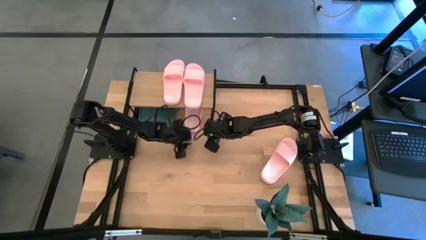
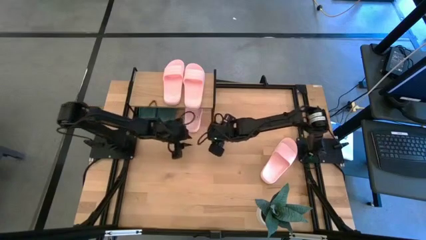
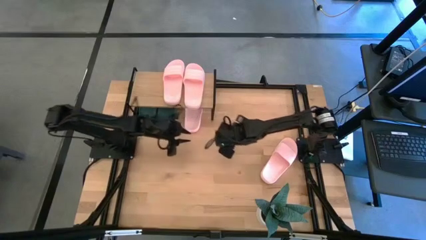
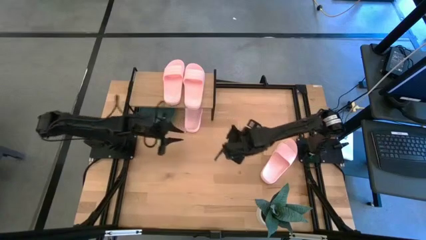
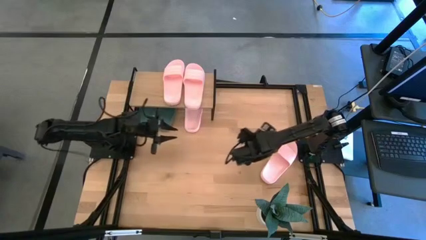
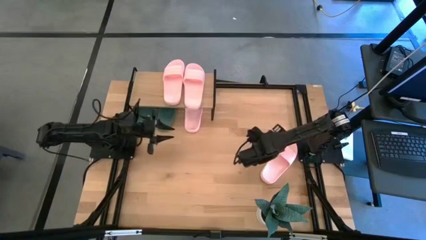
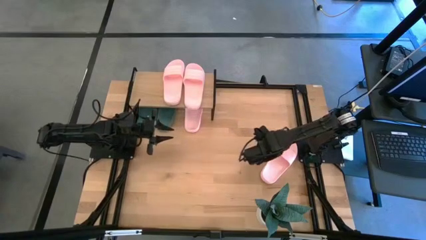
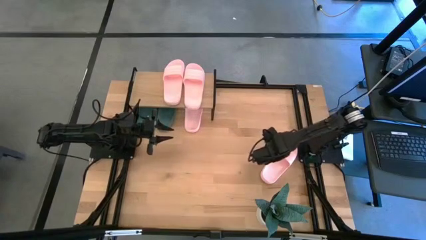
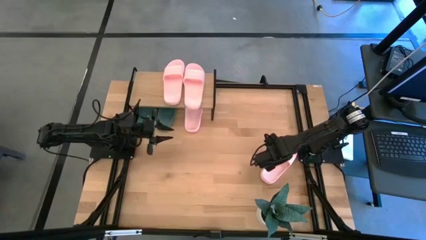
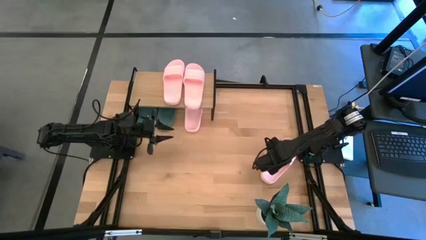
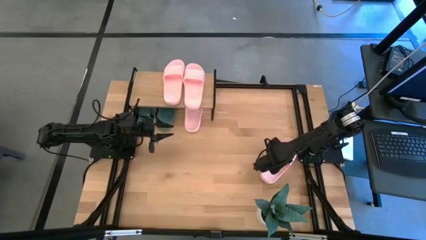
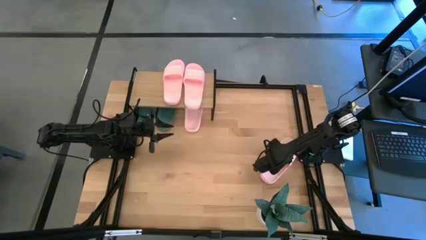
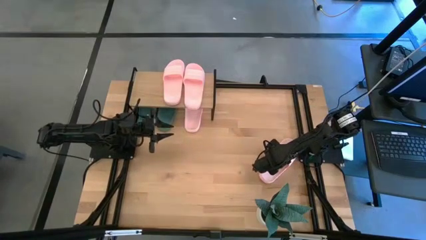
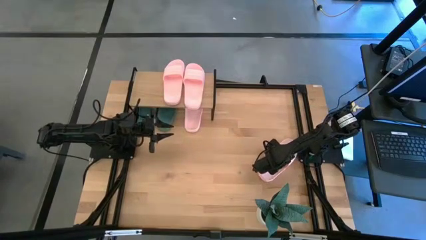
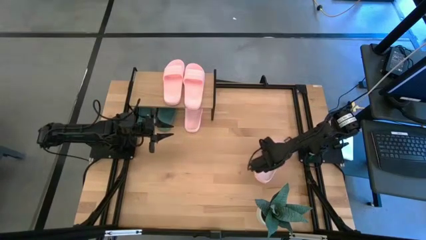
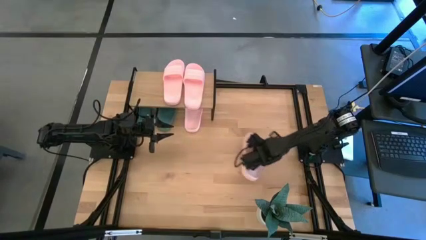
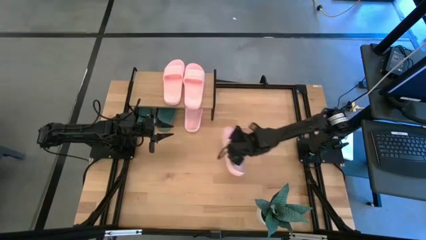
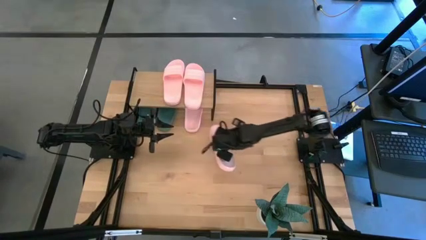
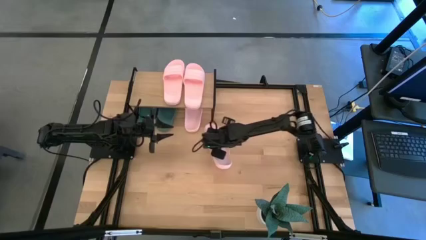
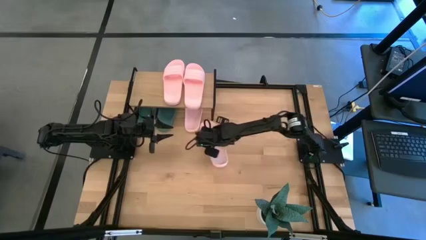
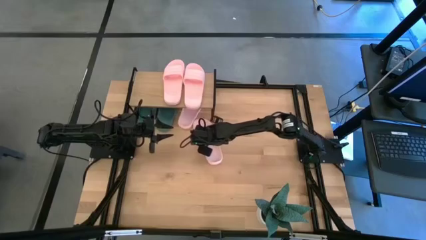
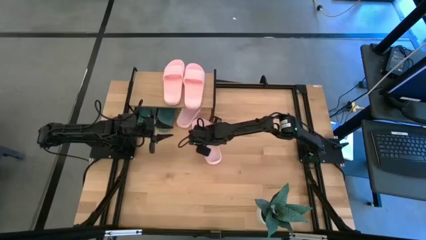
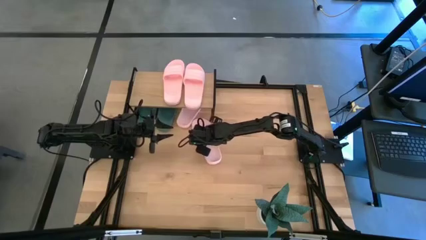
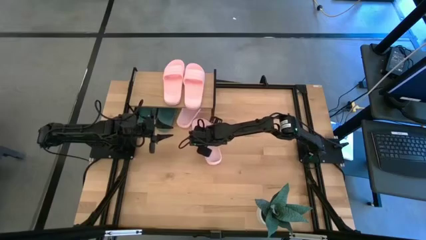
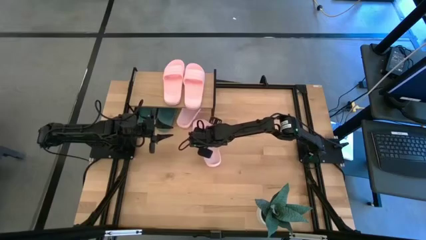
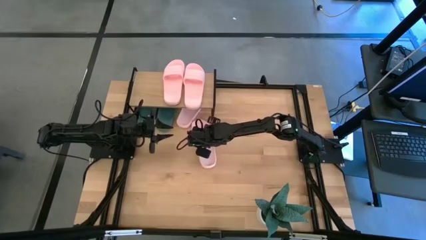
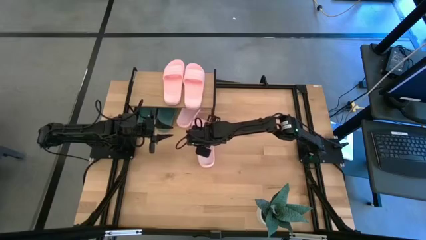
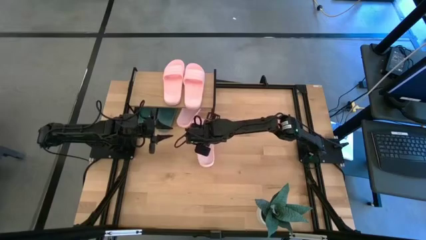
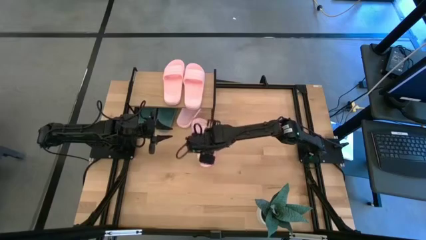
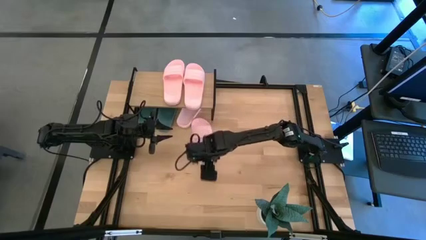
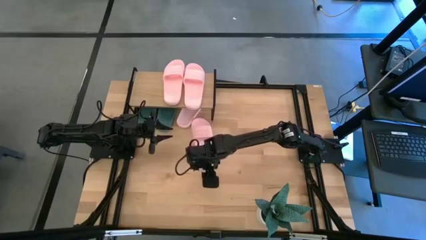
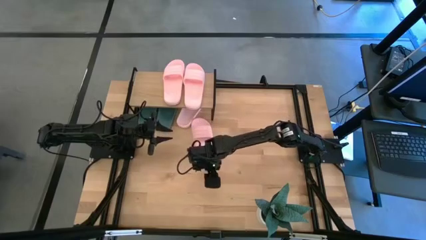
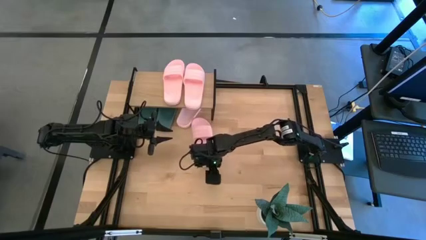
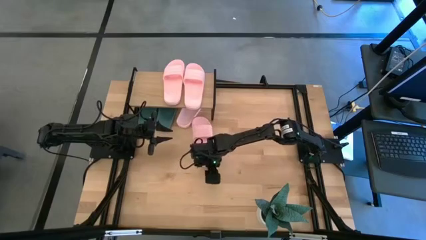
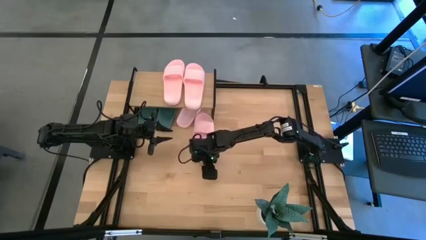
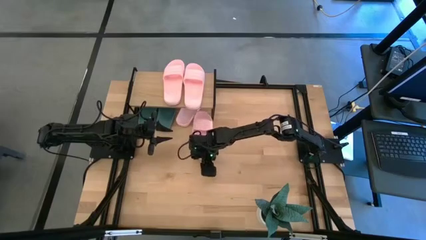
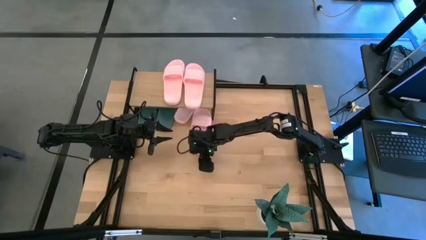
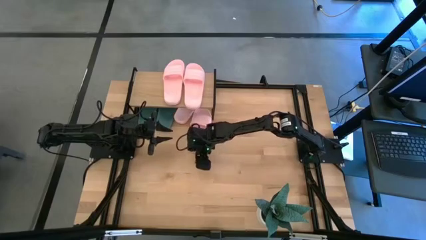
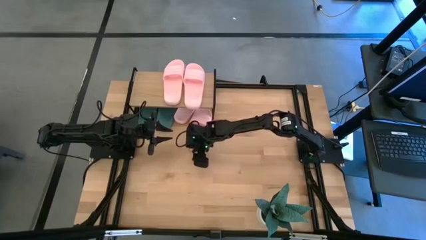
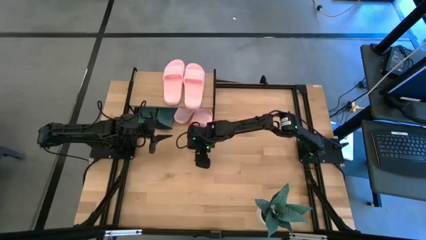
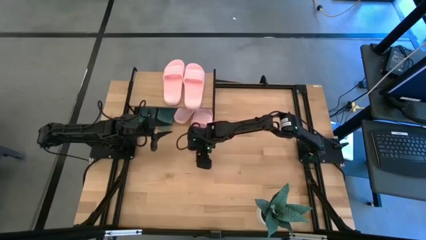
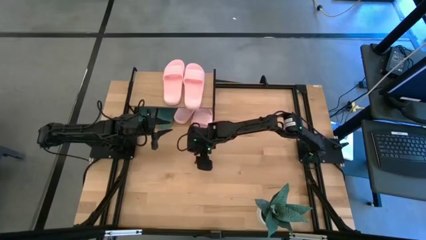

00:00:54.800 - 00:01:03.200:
Task: Pick and place slides into the shelf
Put the pink slide under the shelf

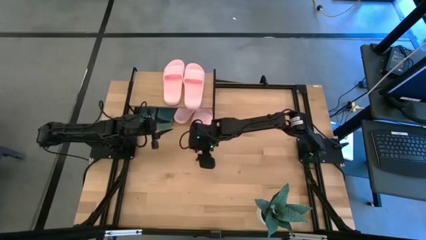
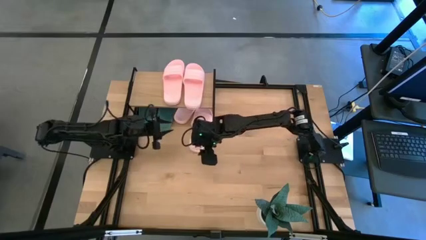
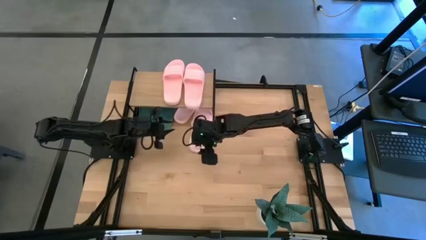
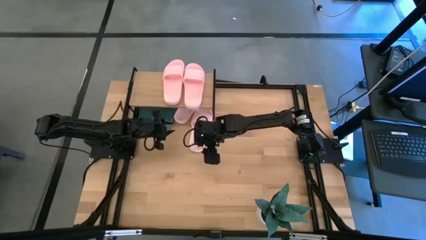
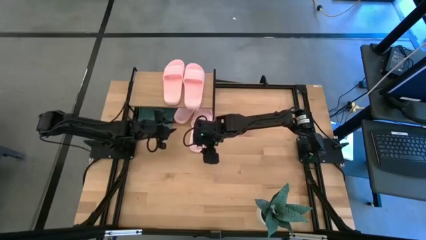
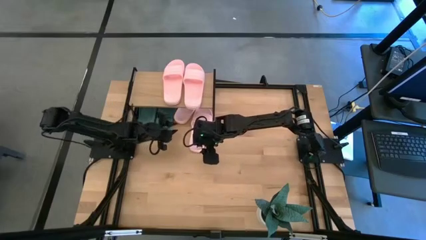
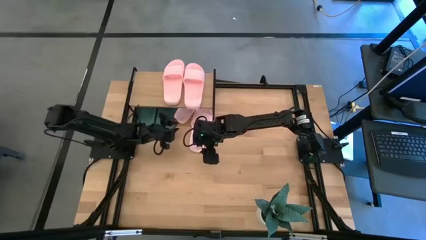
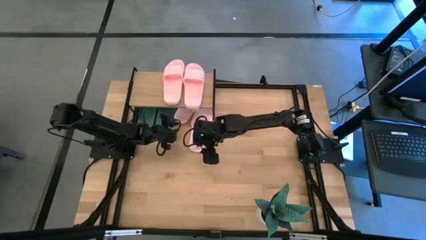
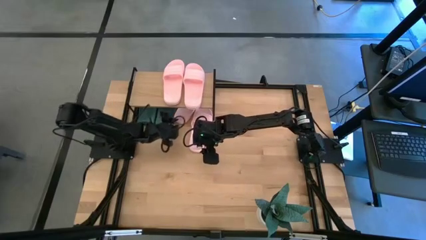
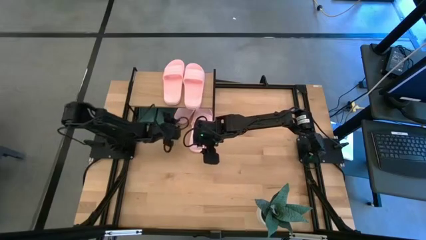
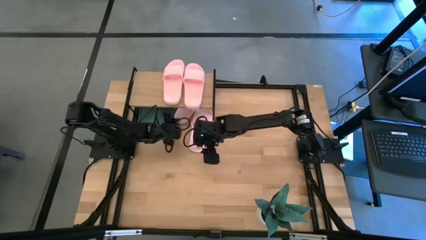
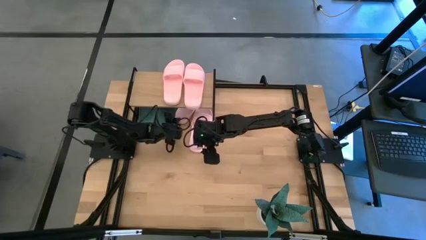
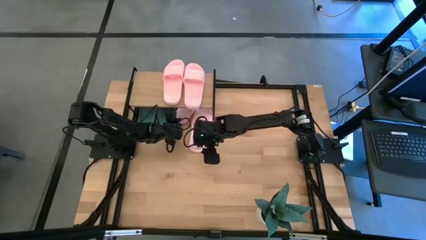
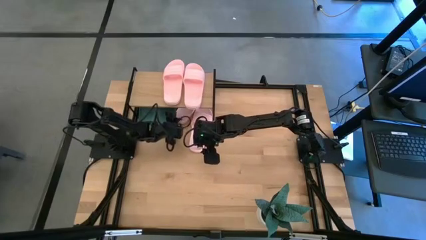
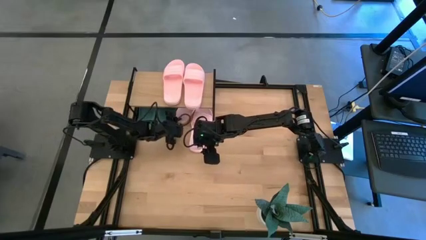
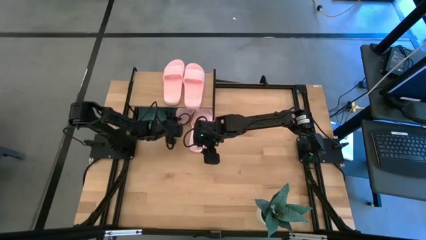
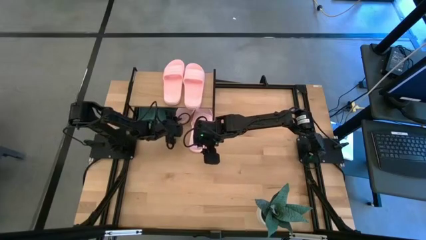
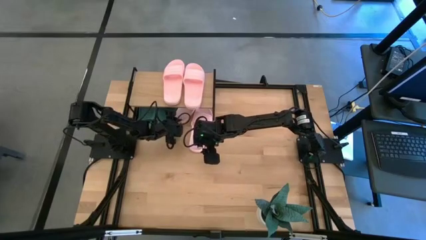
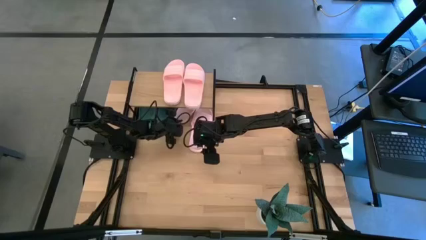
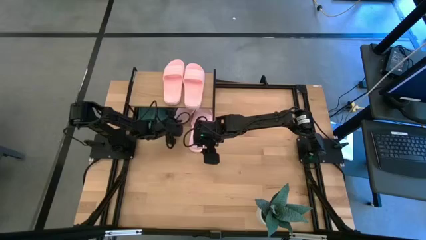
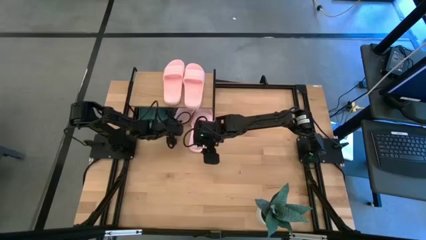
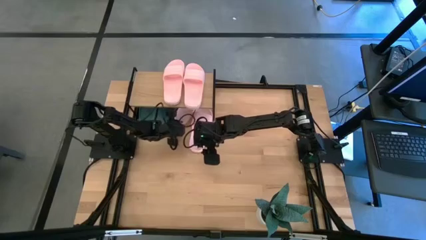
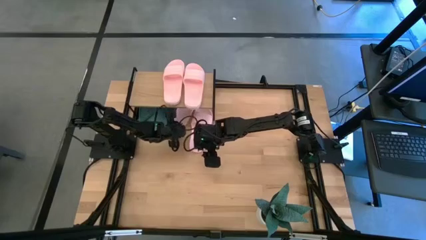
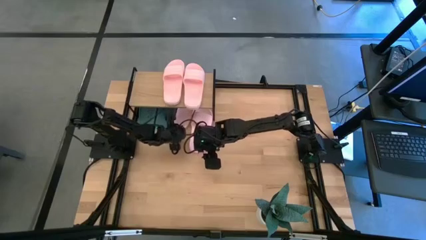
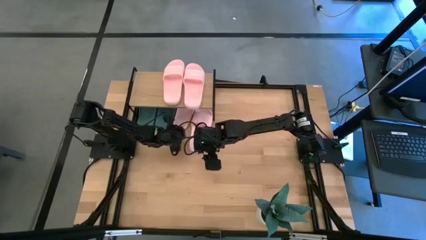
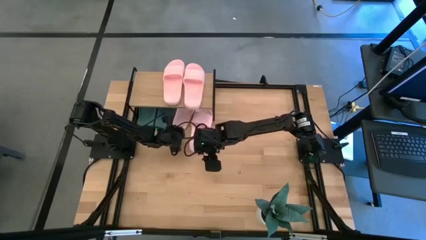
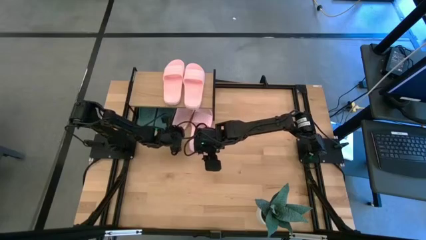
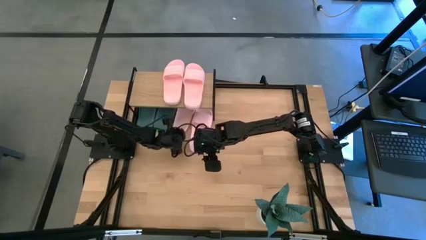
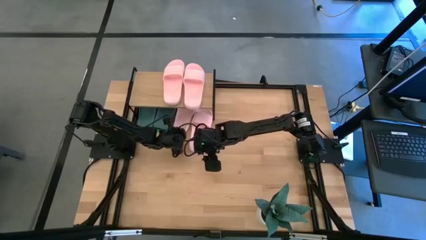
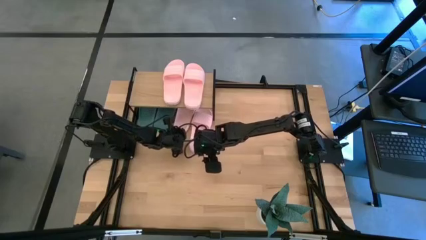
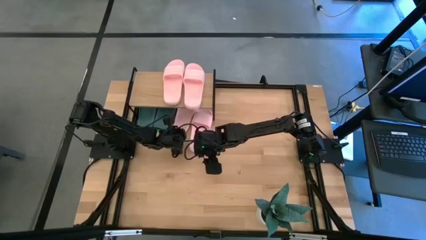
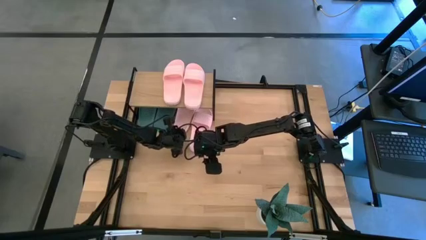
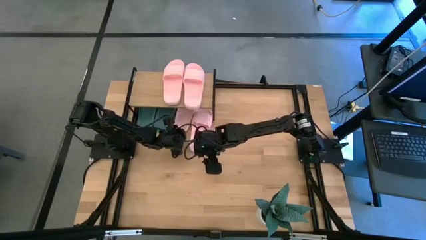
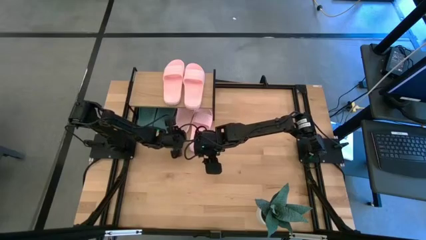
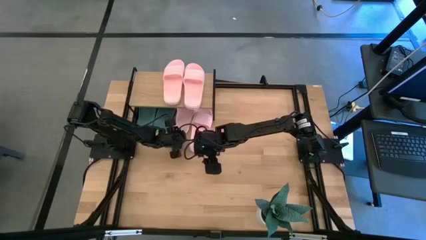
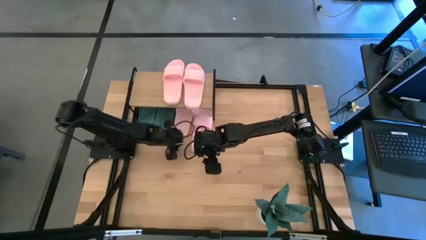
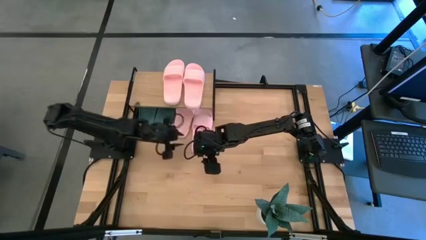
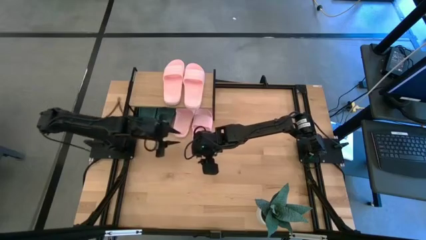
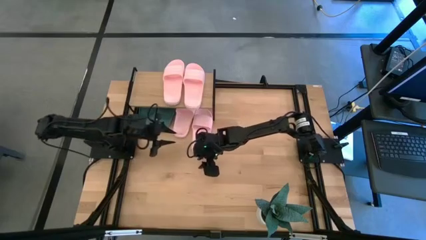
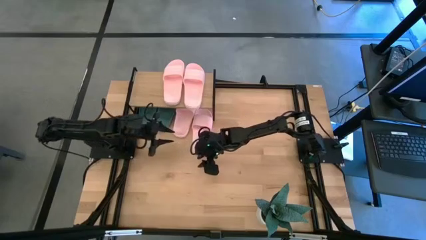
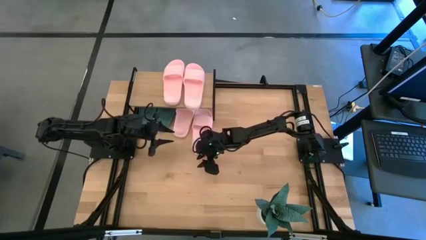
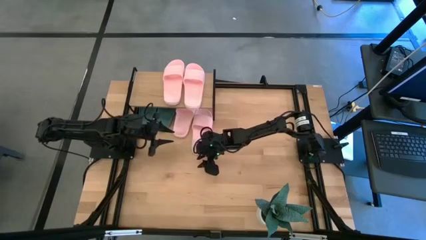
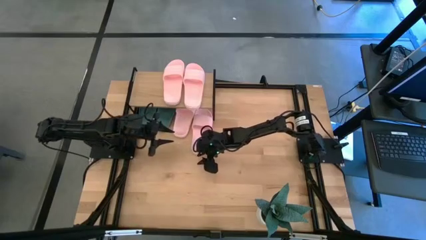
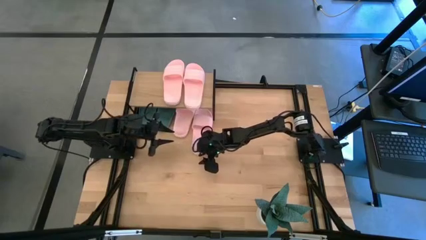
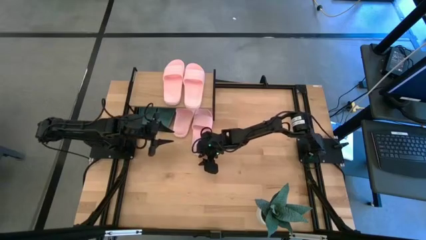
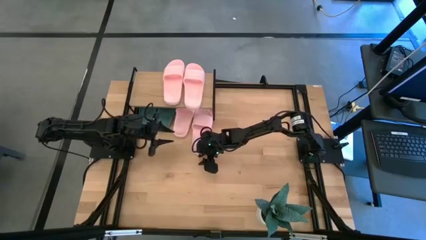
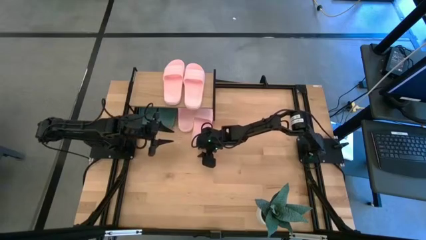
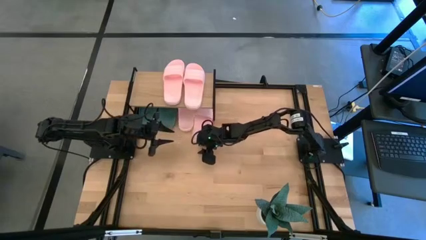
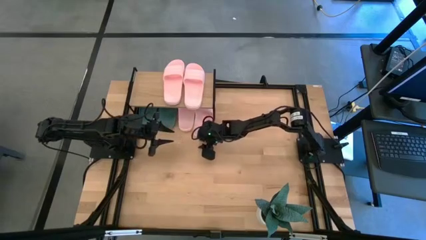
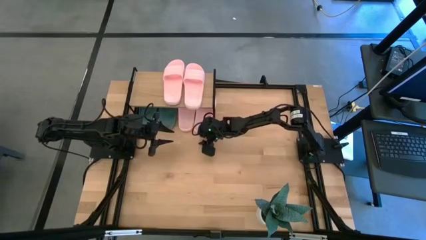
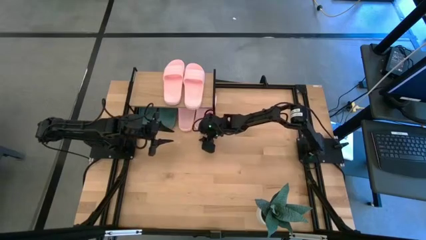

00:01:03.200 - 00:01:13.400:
Adjust the slides under the shelf
